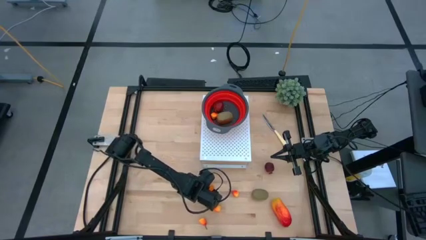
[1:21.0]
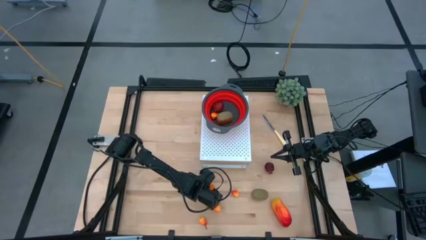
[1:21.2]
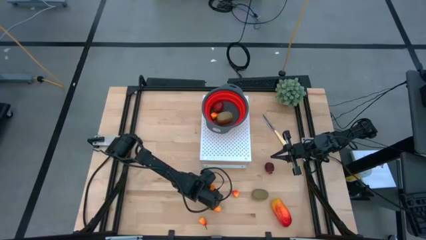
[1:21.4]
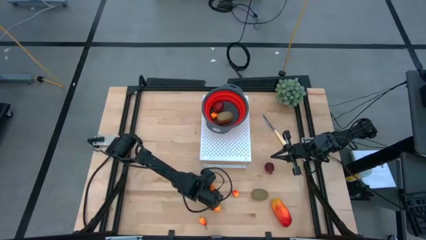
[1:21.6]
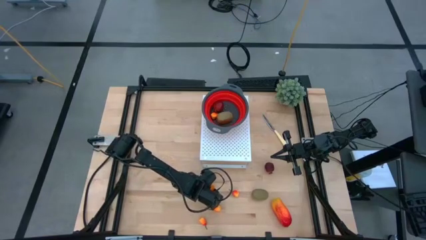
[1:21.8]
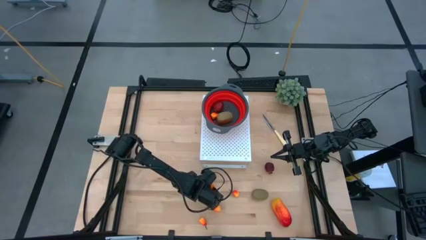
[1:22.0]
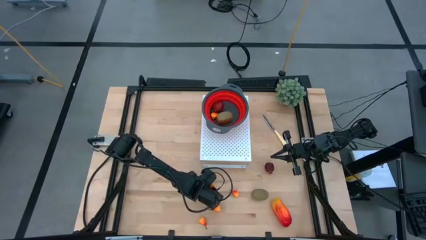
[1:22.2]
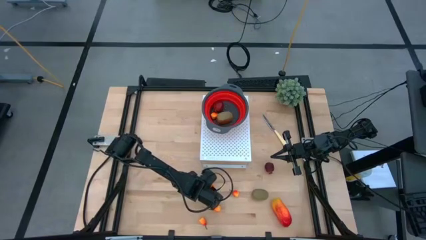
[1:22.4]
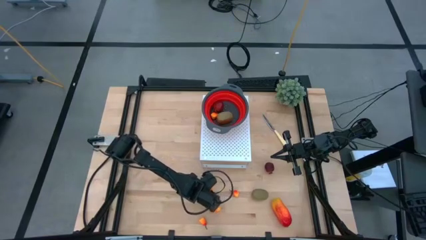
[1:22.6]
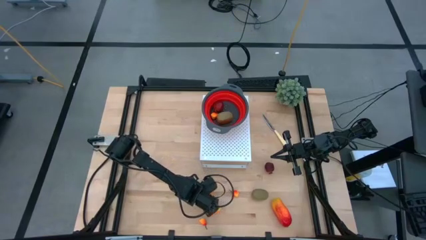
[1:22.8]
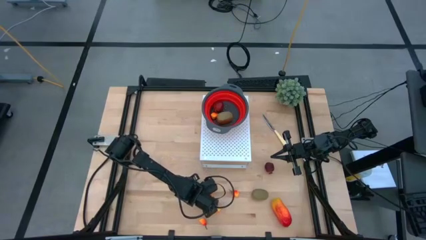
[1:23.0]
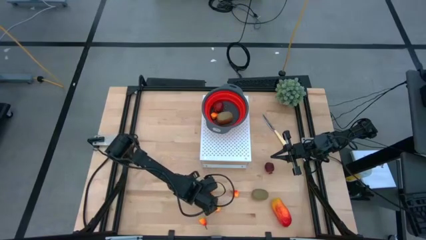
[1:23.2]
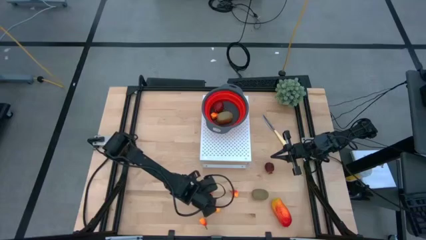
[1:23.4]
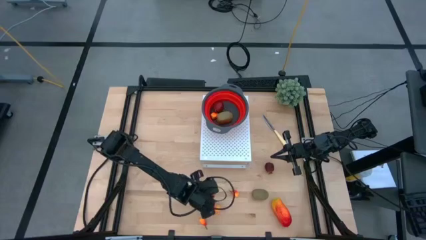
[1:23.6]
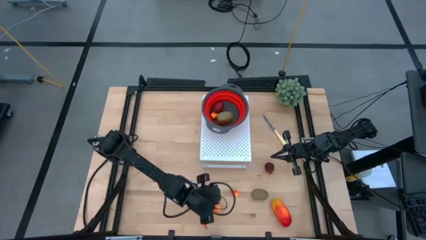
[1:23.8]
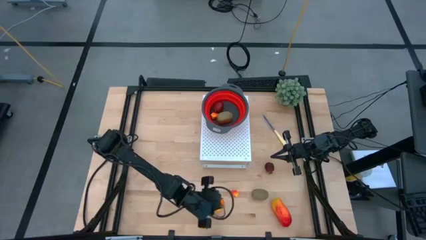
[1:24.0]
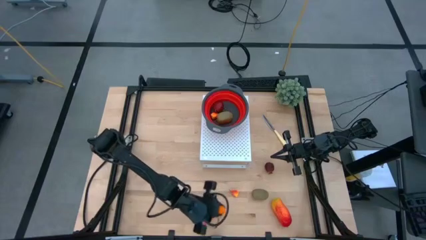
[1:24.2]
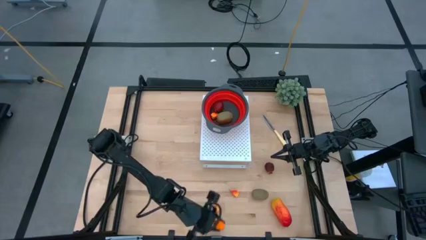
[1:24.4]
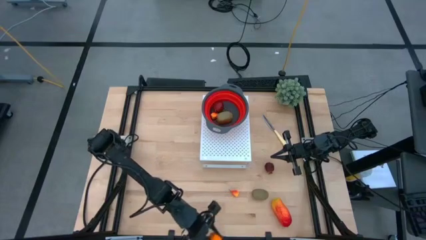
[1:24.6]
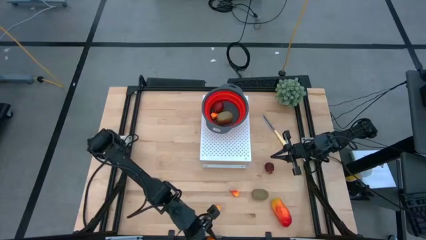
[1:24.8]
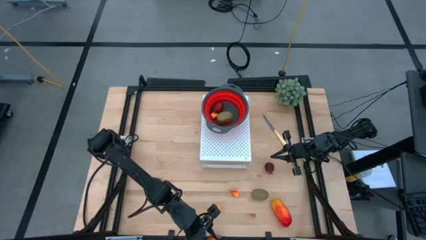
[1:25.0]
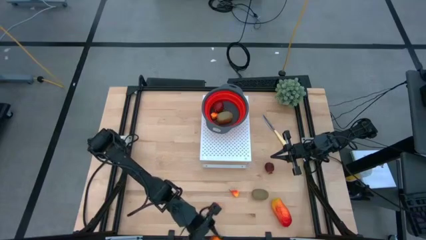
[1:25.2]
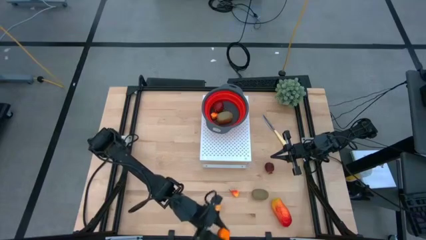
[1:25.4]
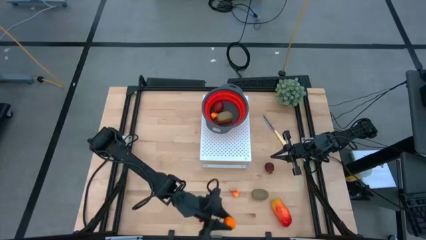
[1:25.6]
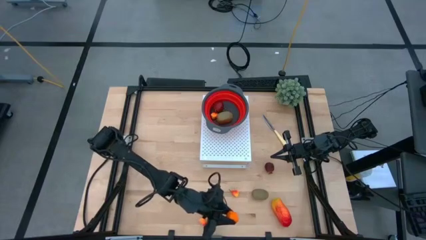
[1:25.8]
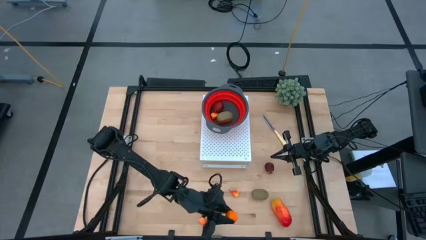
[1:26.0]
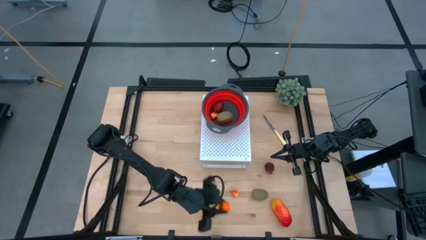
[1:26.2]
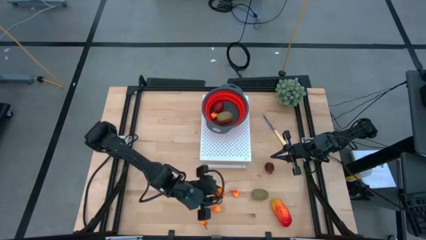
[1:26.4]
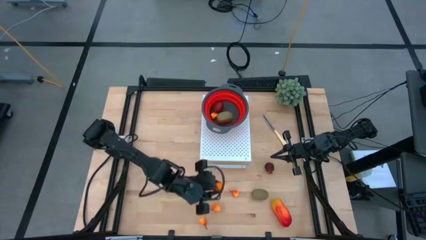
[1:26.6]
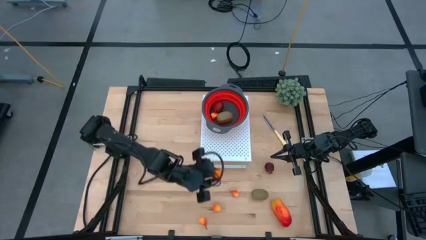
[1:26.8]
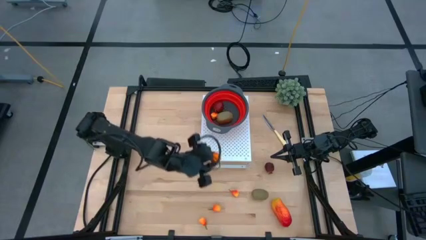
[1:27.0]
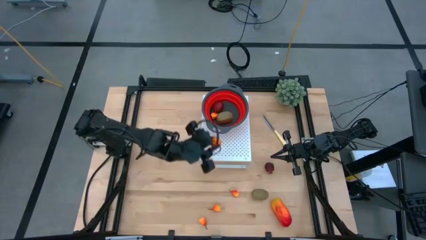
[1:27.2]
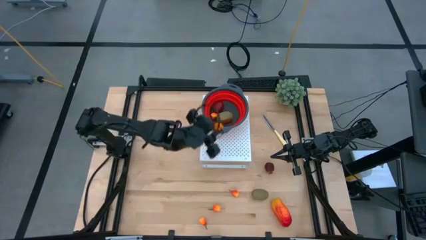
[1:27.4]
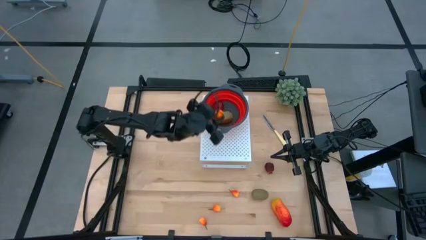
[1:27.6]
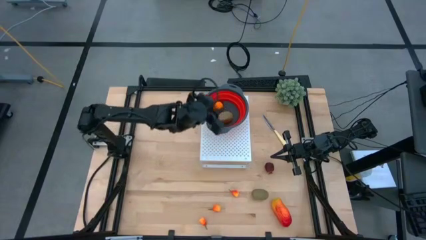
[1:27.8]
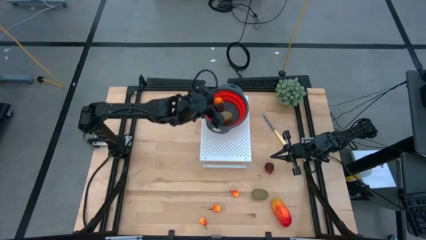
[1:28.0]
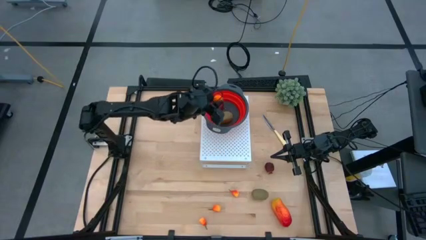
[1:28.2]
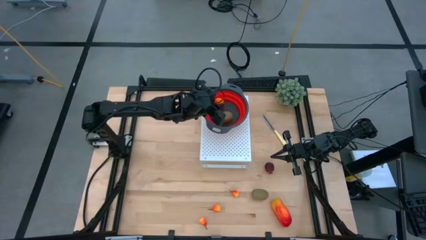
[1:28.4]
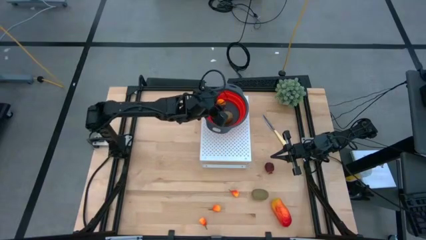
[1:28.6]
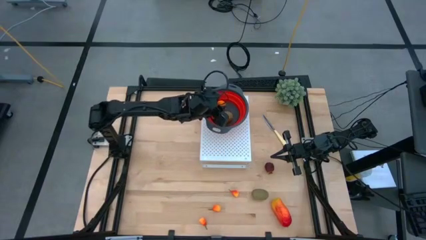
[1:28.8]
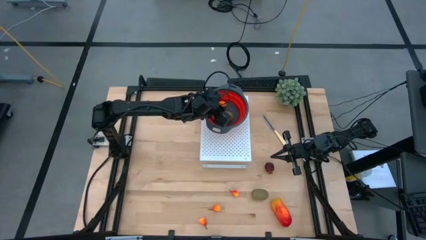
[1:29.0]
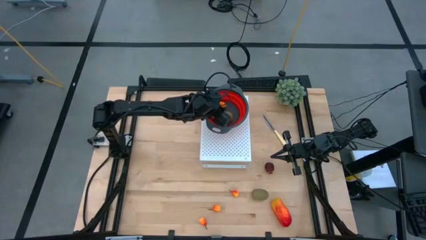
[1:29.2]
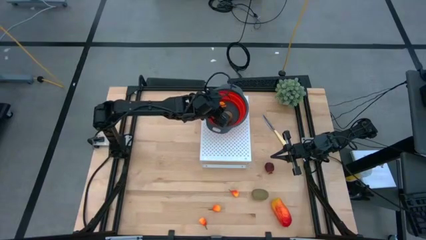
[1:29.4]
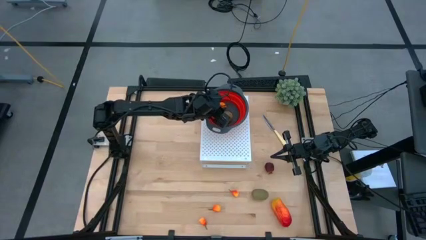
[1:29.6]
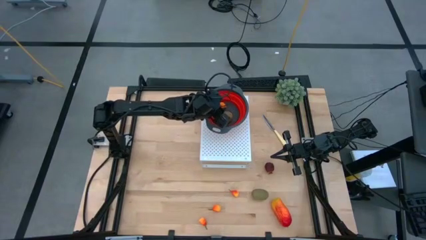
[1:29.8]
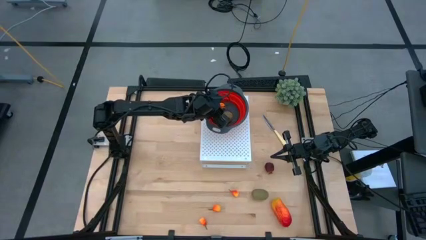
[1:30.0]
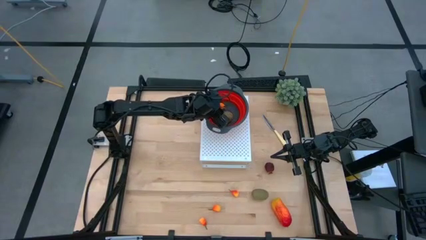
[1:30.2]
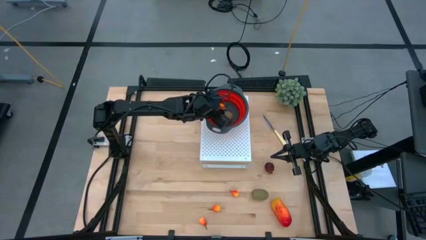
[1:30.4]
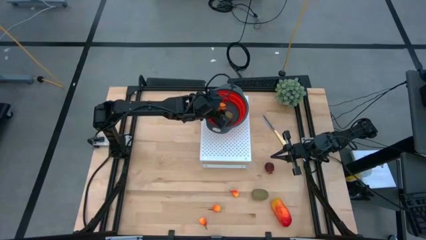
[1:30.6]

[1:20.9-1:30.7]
Task: Pick & Place Fruit
Put the orange into the red strainer bowl

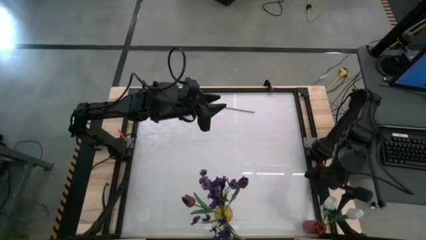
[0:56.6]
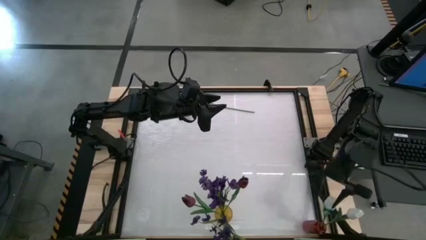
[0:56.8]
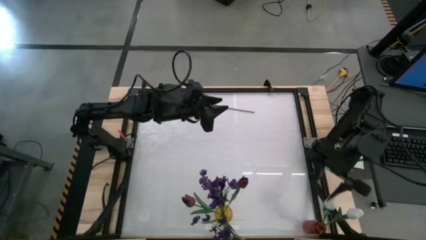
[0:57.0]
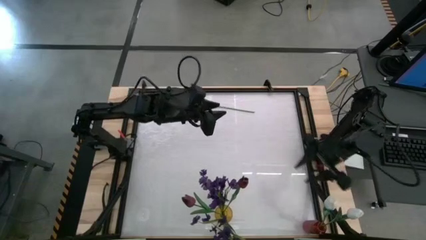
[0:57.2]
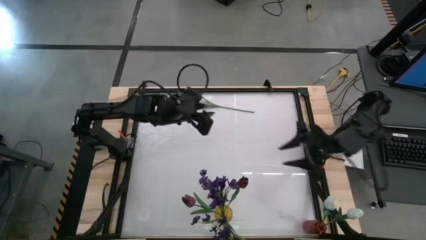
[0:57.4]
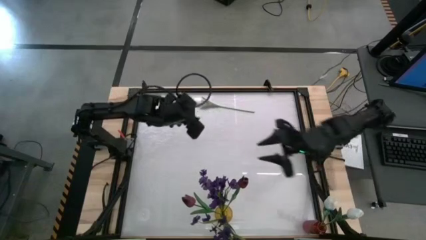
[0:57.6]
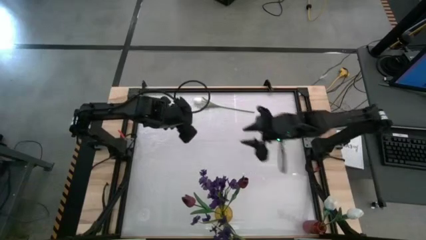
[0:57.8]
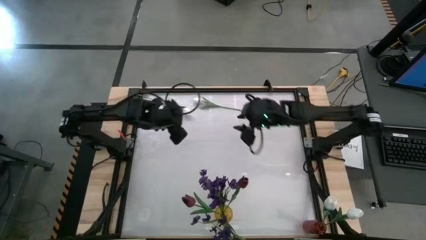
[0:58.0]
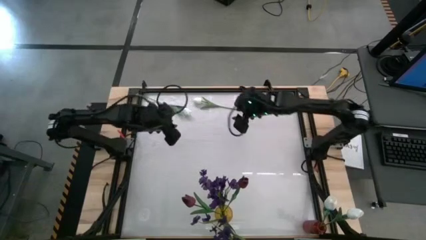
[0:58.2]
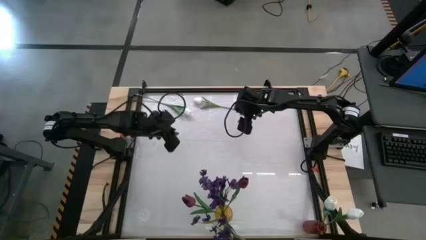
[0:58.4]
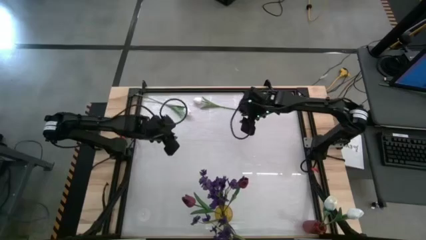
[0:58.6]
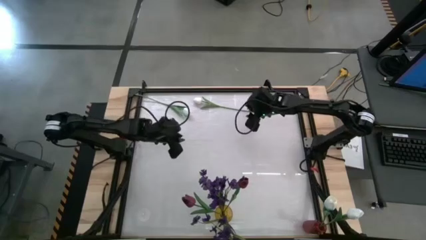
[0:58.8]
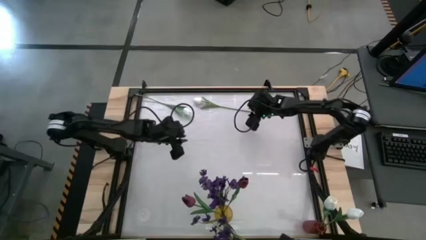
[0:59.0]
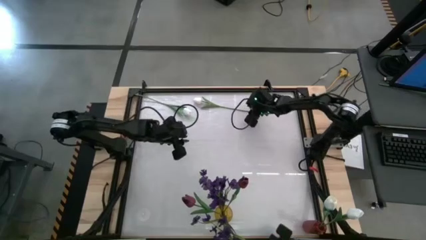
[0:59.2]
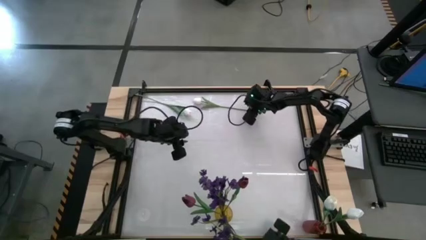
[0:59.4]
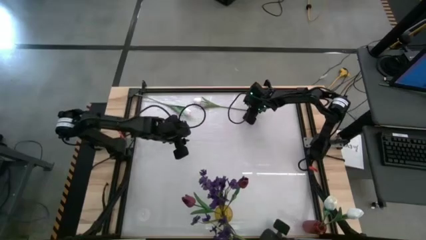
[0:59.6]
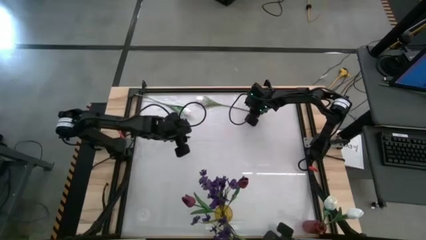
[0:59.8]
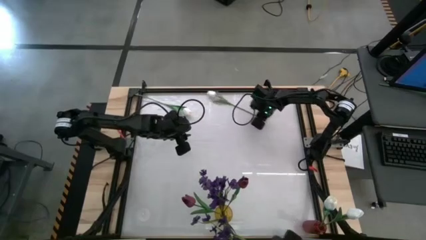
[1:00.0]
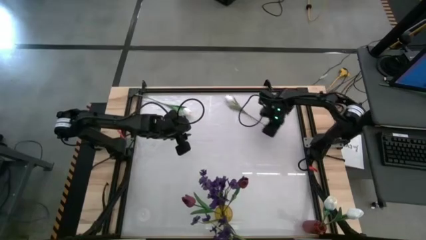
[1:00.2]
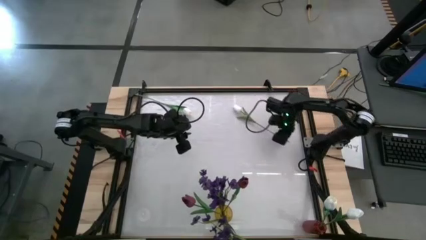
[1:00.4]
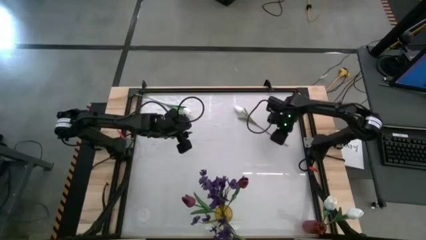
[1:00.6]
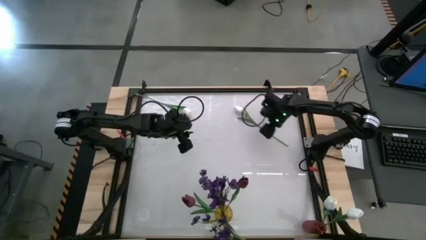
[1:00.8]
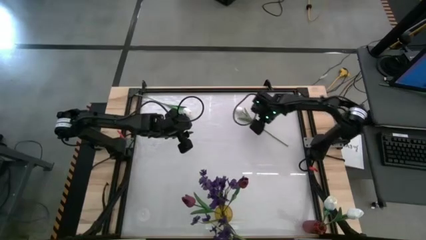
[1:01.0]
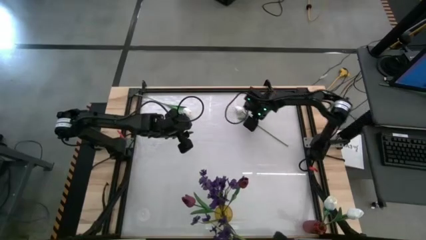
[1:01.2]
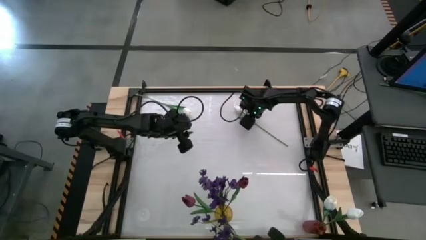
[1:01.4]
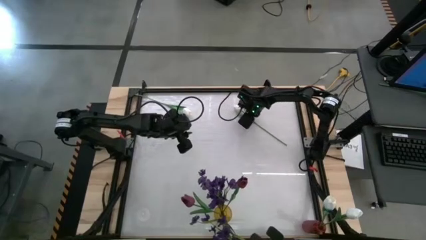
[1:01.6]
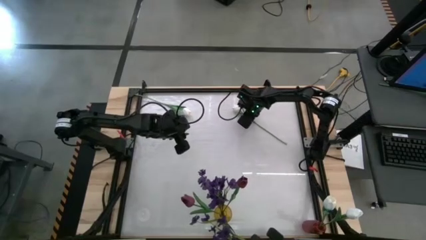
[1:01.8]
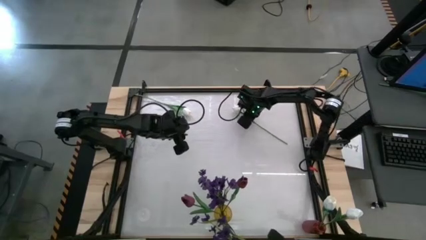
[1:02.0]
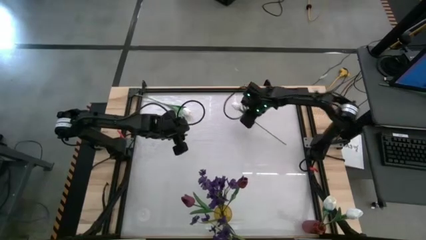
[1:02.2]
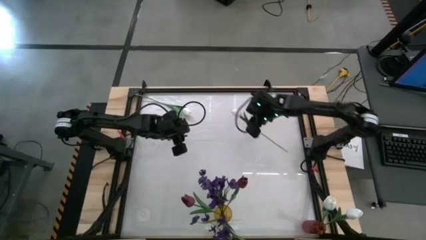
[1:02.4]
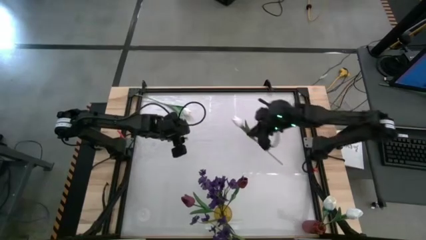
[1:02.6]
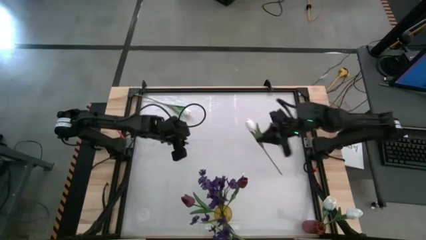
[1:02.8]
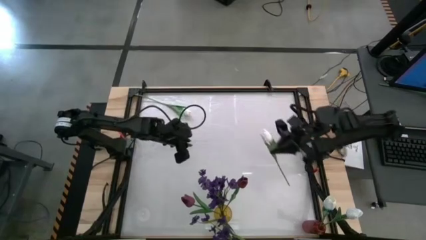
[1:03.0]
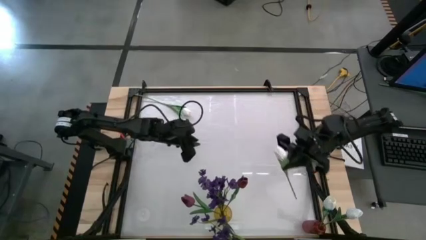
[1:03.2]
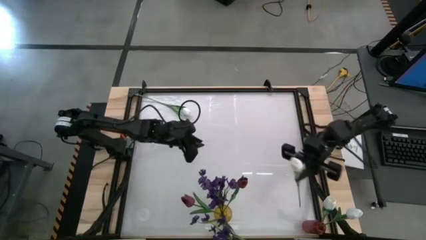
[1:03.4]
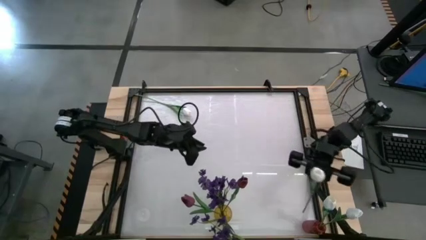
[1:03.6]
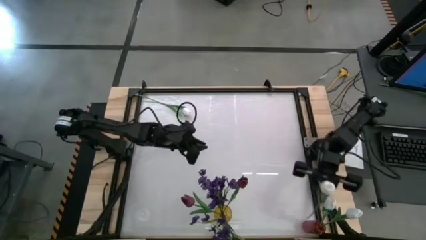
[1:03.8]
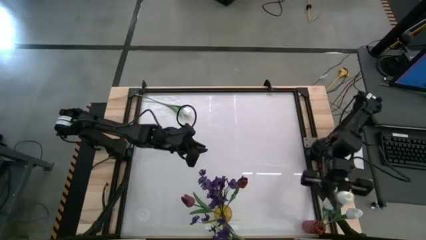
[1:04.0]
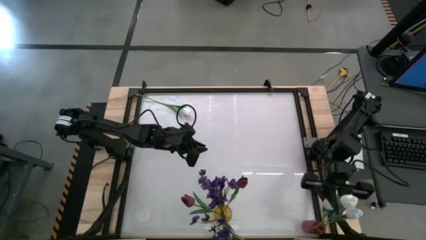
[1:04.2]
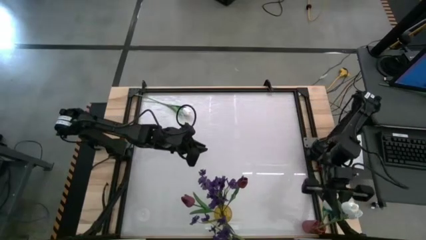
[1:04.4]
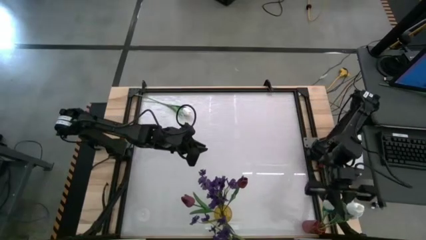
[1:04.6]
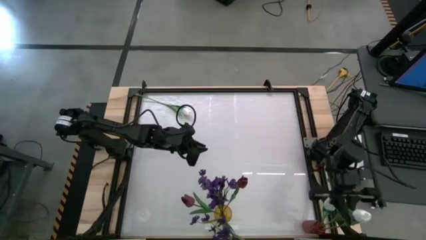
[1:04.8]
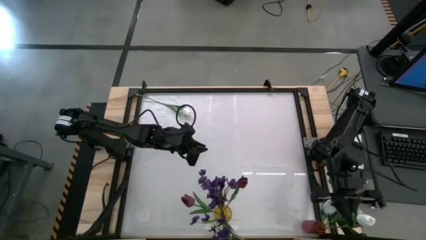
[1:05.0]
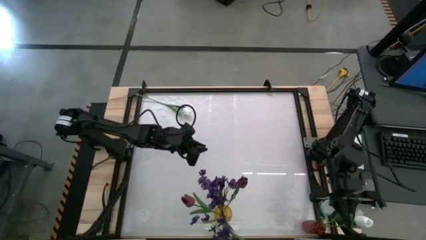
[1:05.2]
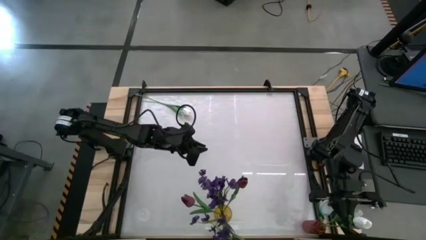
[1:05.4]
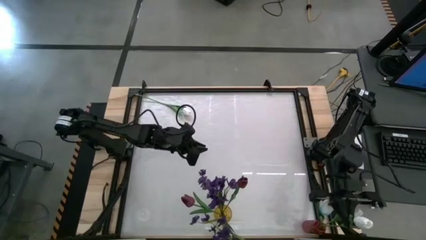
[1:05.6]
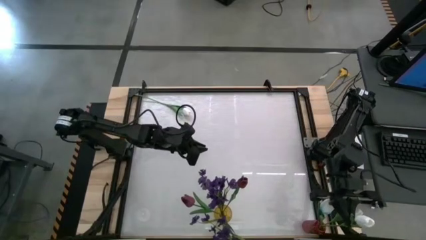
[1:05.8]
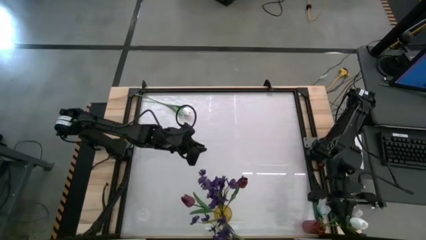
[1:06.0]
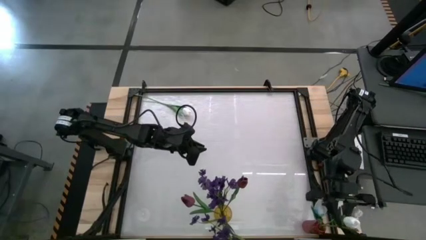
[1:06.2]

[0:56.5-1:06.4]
Task: Sort flowers into vase by color
Put the white flower into the red vase
